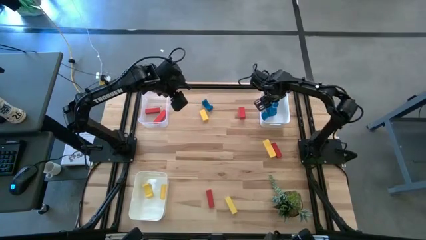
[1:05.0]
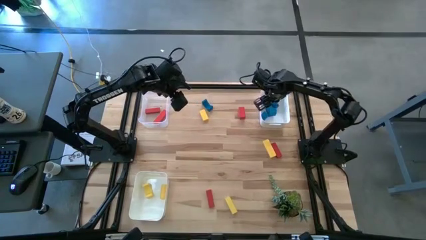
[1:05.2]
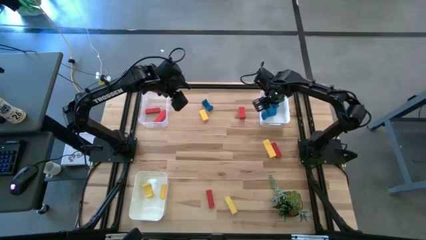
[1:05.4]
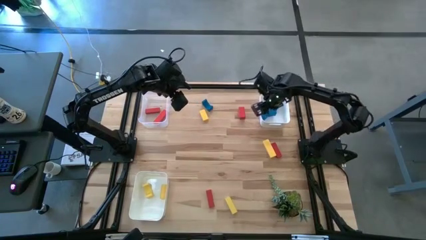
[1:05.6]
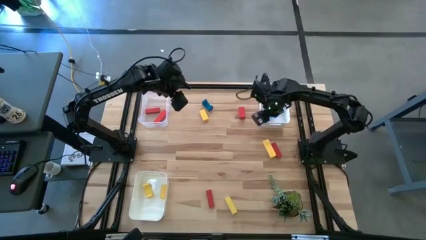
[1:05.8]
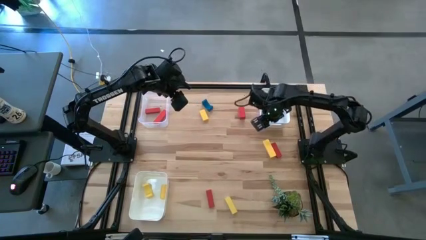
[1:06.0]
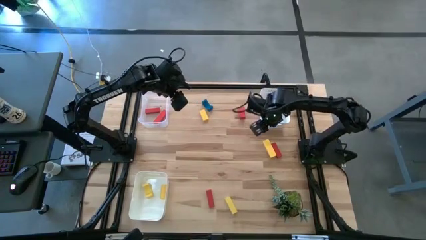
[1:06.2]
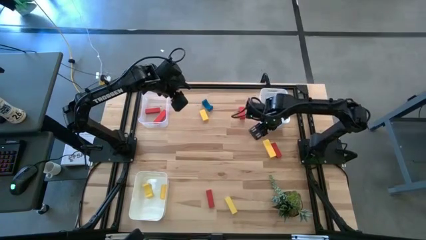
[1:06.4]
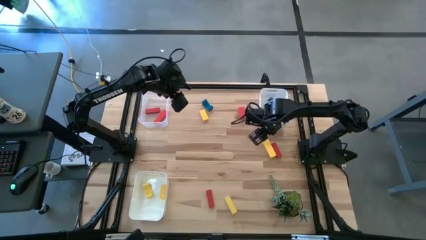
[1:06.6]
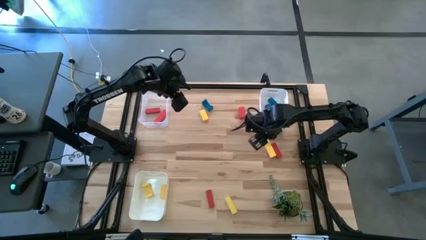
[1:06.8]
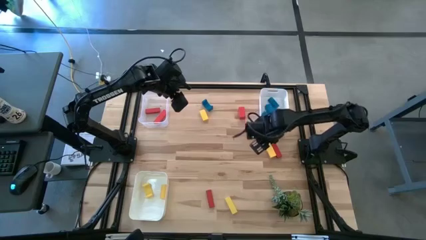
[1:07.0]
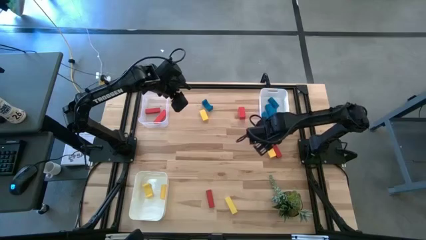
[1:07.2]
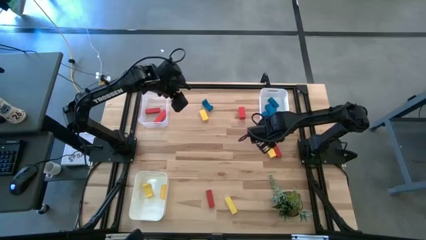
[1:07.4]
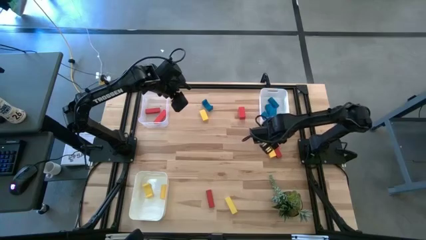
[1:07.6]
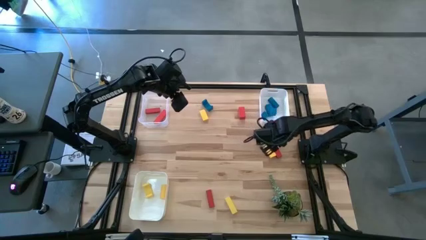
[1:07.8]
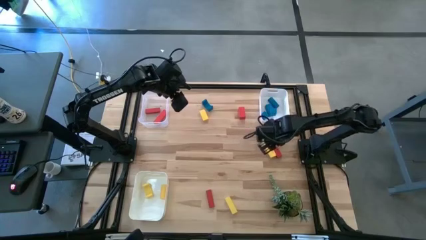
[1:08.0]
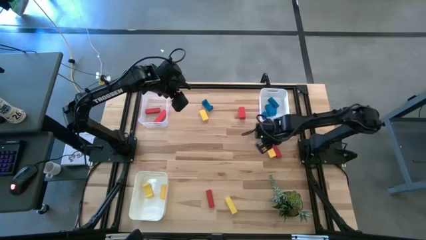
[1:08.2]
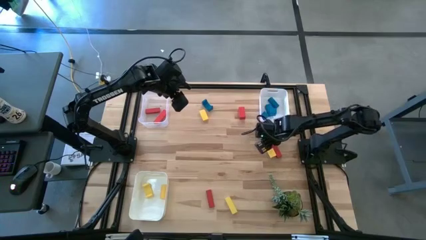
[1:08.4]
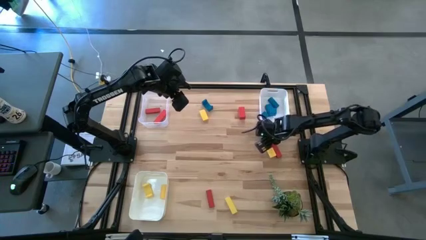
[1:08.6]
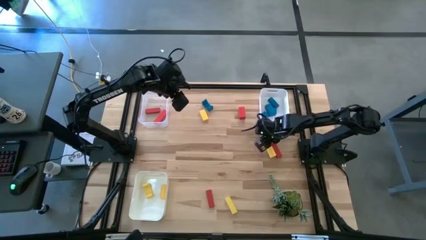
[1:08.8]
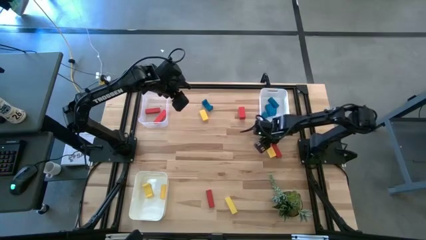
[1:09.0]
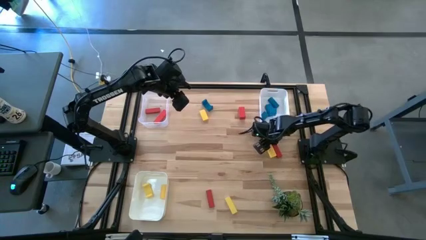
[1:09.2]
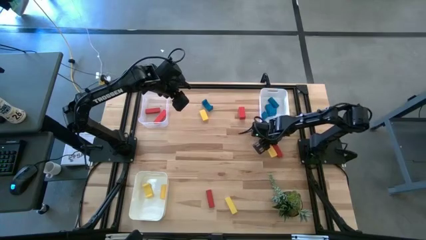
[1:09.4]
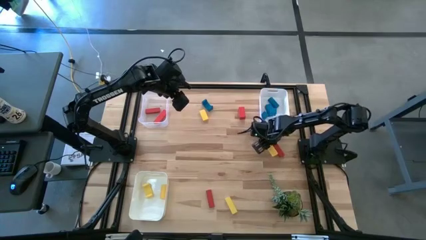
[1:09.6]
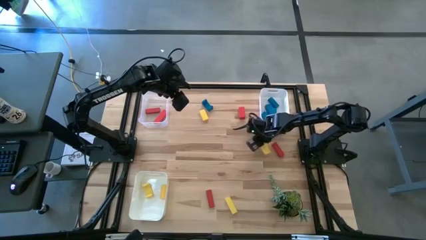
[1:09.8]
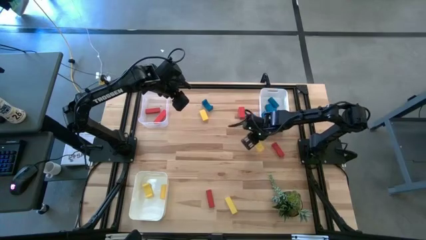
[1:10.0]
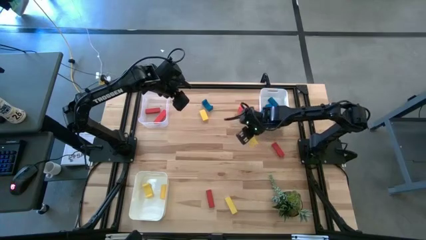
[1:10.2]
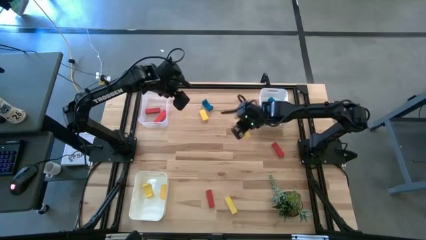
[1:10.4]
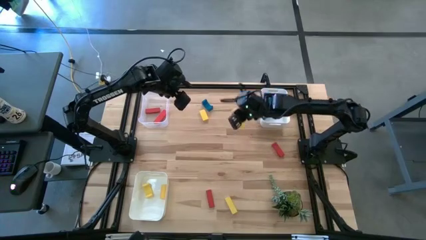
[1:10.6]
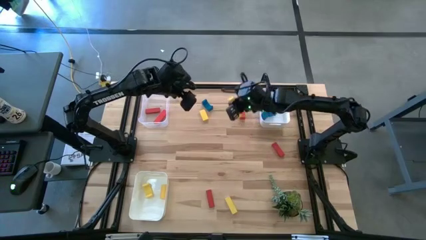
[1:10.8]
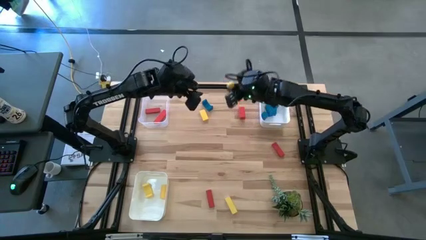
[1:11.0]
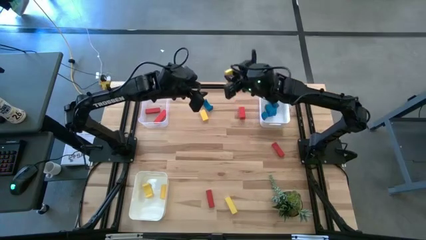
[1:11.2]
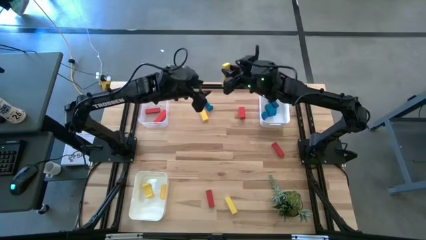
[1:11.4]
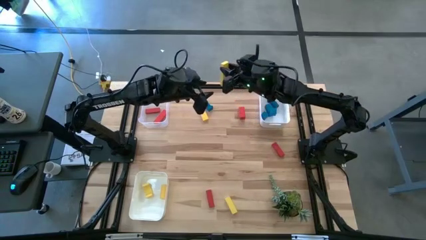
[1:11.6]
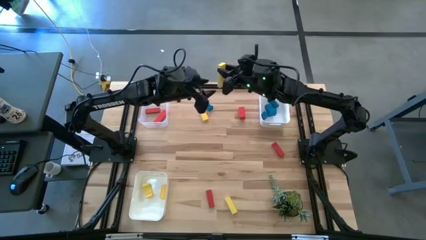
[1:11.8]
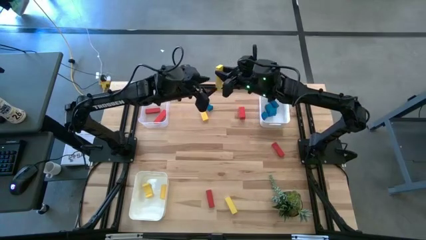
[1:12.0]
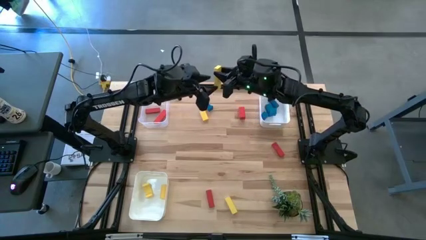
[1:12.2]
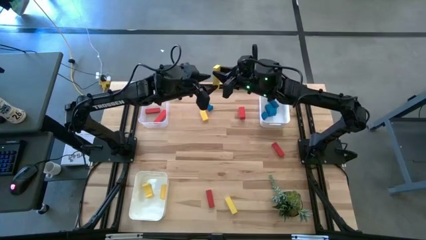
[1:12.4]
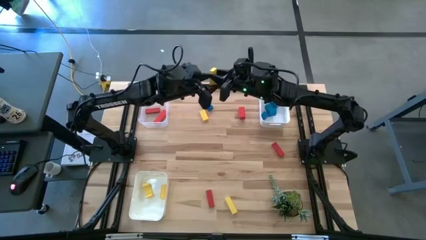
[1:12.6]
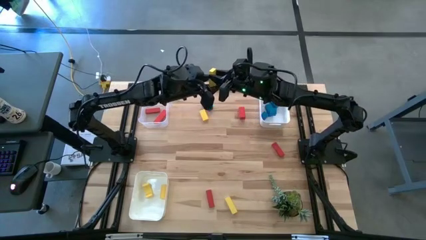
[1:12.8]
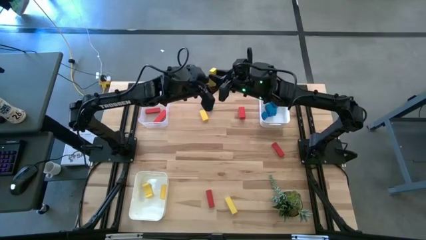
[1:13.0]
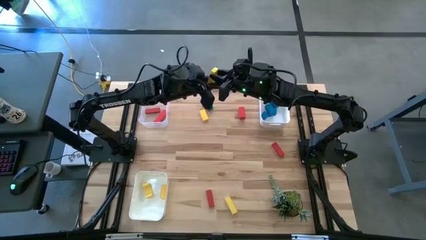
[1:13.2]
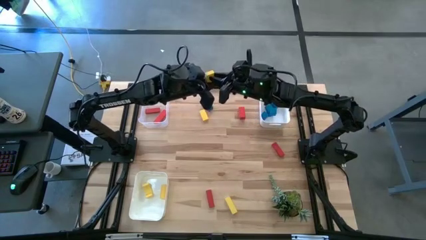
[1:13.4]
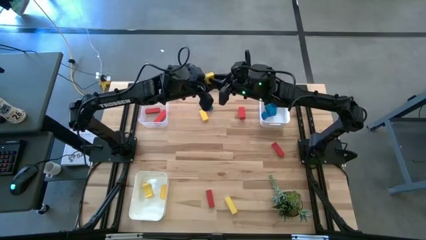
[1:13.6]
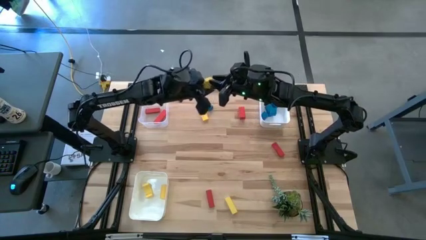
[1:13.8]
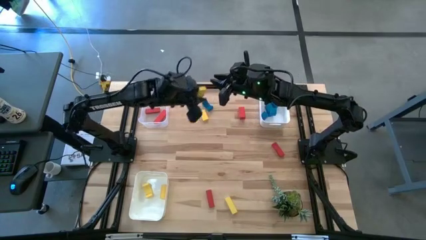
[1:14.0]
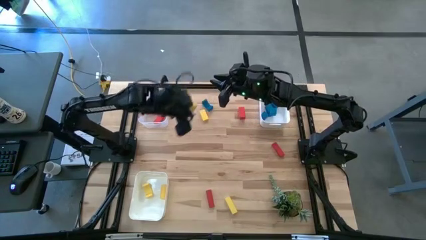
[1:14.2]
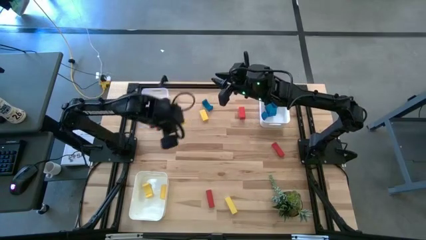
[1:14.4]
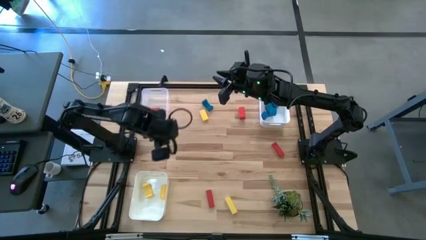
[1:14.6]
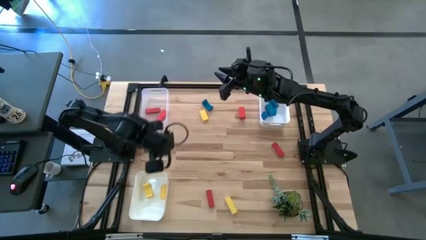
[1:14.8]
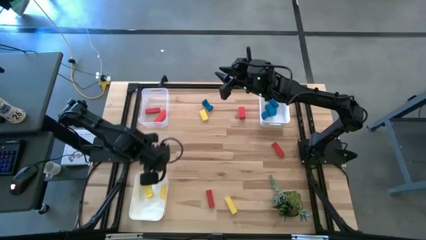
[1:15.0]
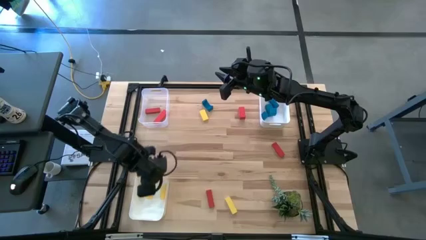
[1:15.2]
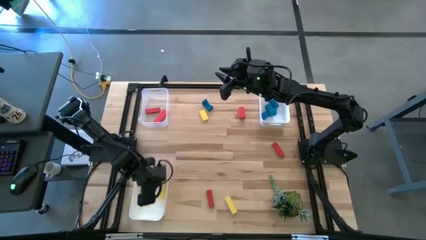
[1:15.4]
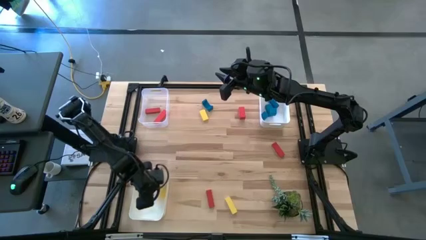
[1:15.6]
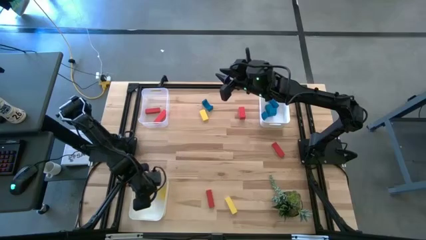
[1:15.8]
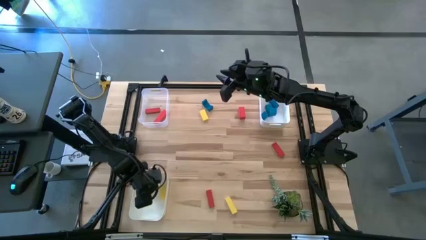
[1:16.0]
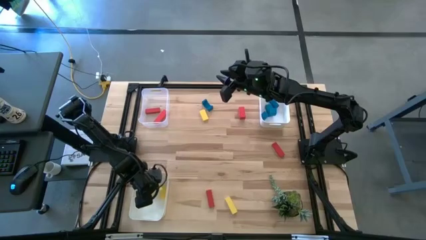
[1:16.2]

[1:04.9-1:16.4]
Task: Sort & place blocks by color
Put the yellow block into the bottom white bin

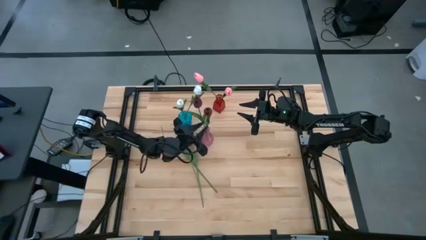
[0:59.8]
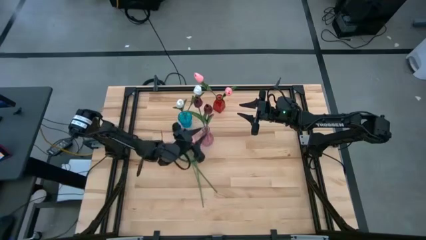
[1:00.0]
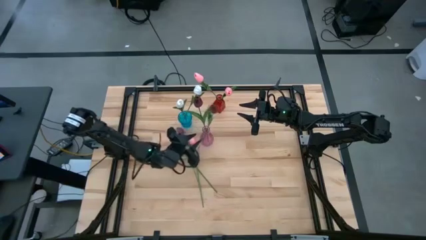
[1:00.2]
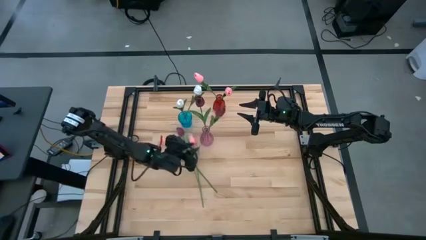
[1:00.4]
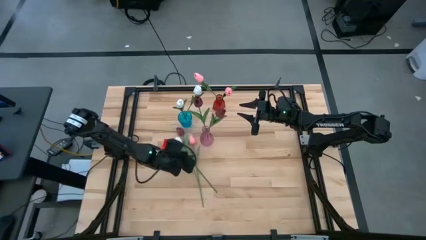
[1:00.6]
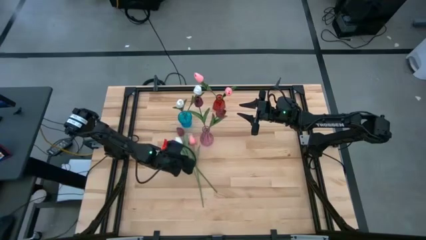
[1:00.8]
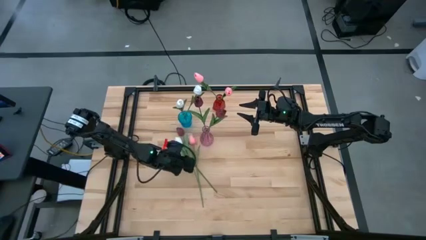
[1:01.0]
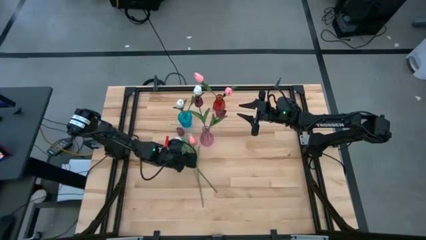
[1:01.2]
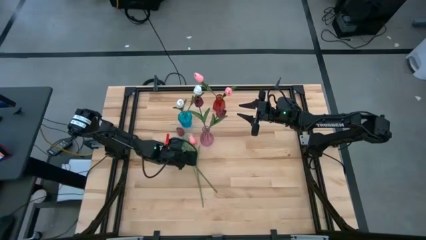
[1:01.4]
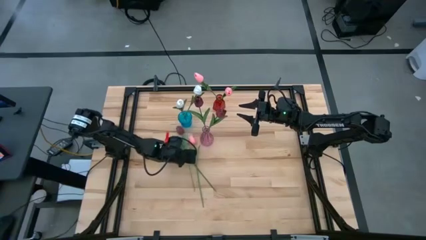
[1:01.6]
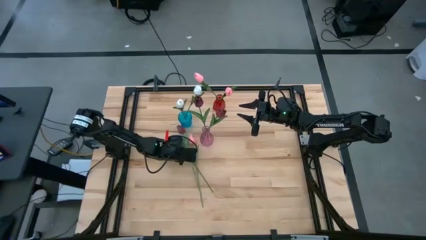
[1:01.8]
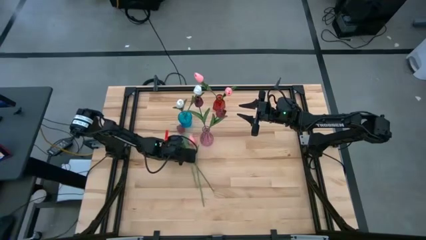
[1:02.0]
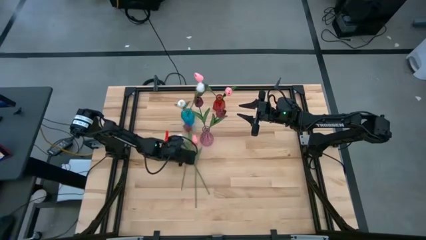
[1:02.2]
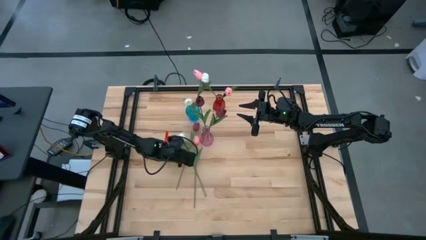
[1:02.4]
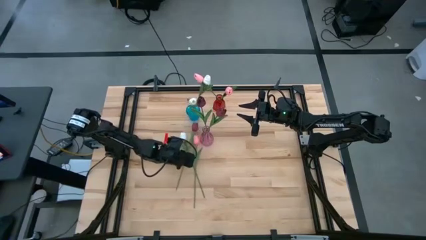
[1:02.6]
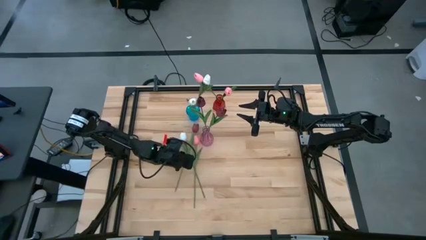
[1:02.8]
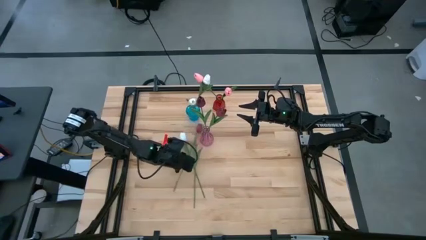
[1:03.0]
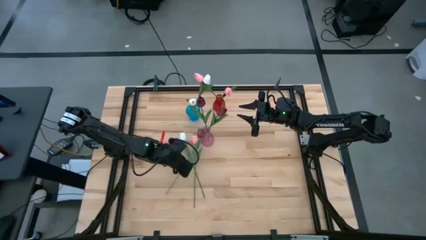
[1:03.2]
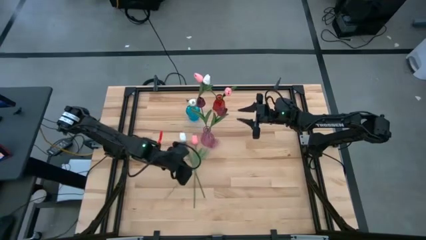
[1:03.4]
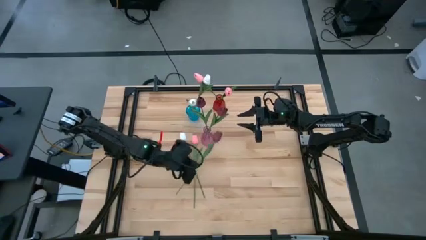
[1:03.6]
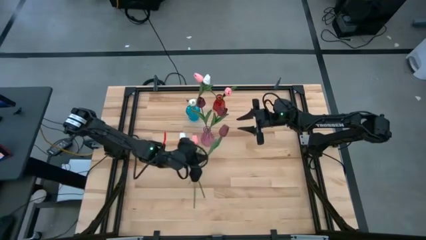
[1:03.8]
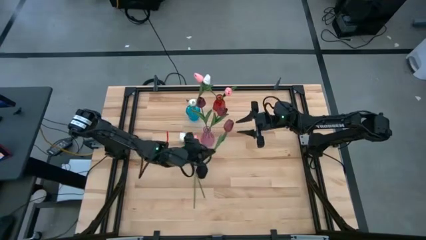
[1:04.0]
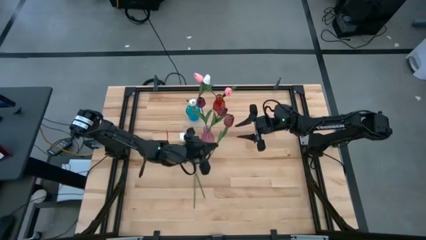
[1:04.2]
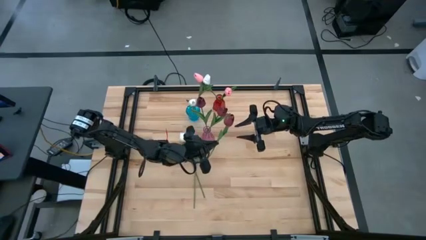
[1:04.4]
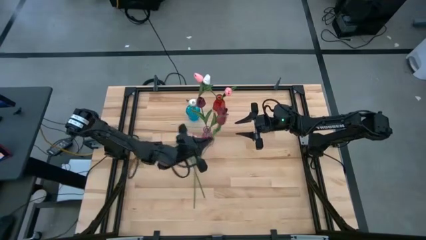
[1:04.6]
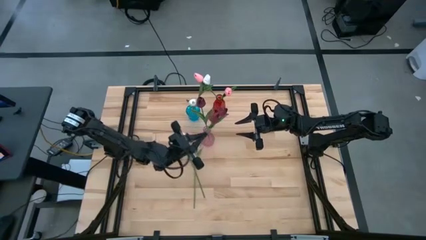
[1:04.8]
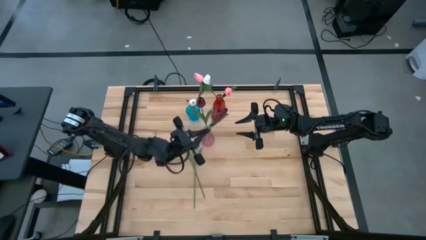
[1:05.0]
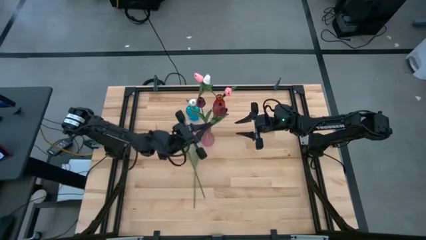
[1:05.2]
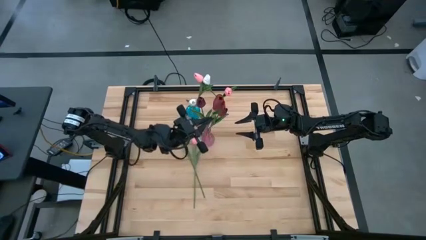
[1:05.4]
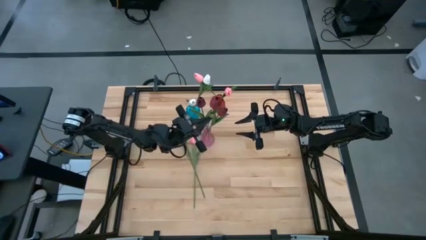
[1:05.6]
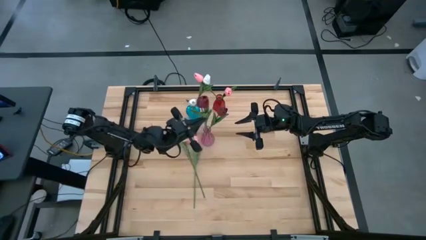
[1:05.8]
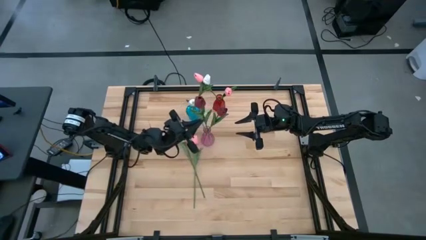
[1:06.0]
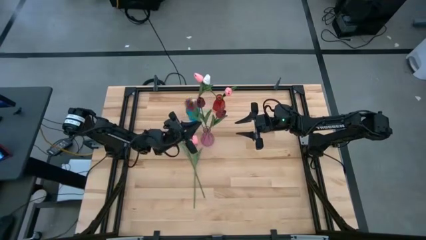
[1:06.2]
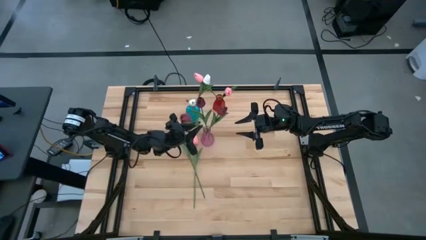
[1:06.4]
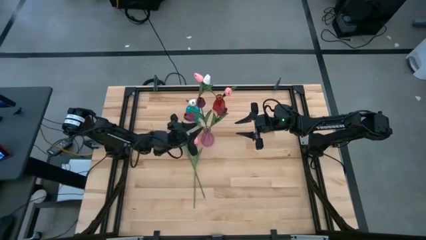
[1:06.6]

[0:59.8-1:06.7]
Task: Sort flowers into vase by color
Put the dark red flower into the pink vase
